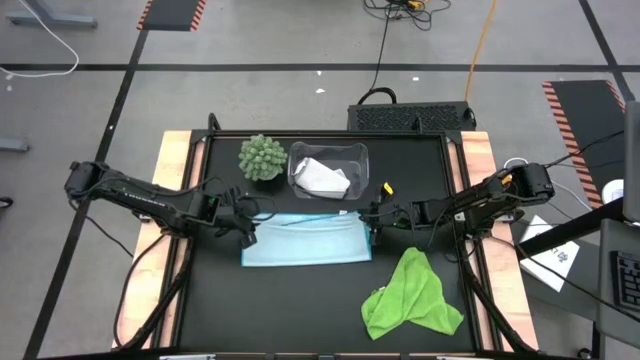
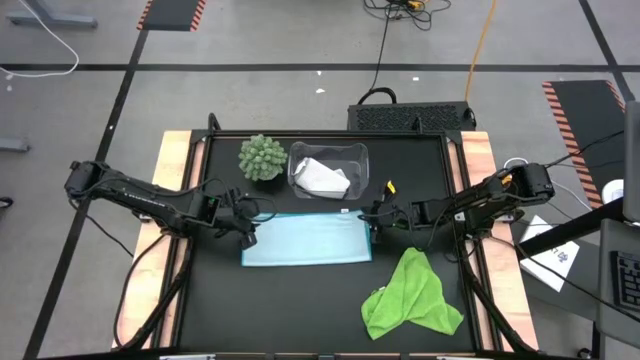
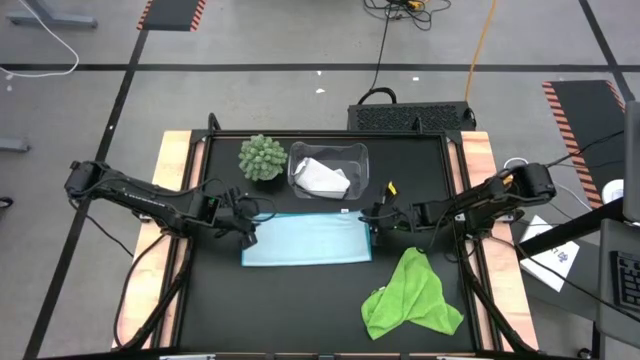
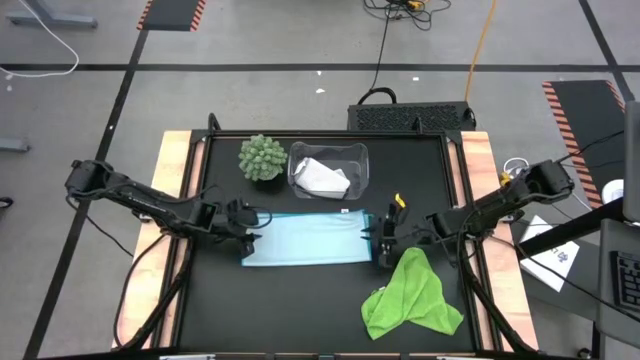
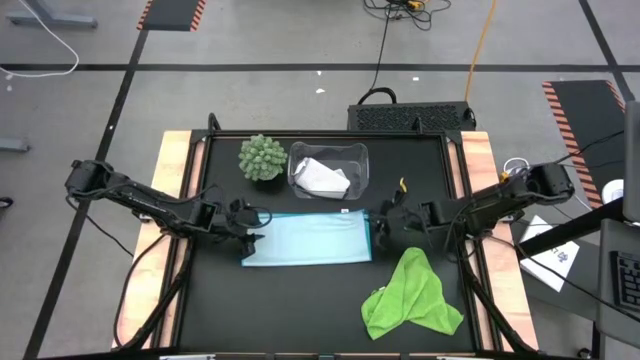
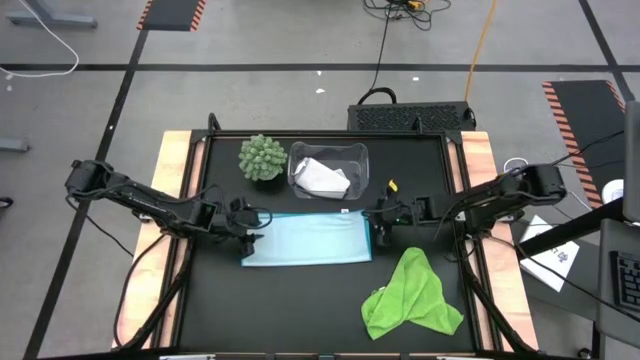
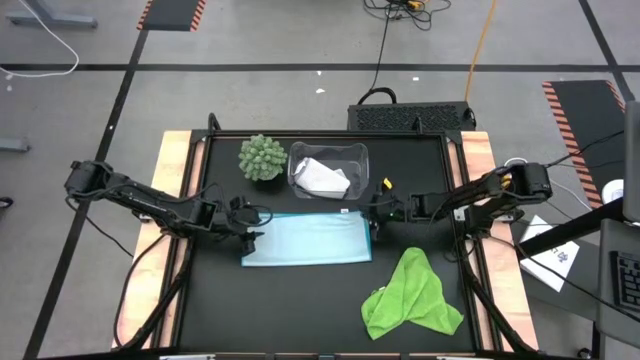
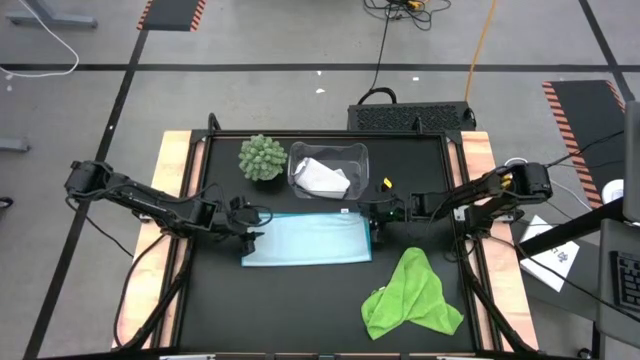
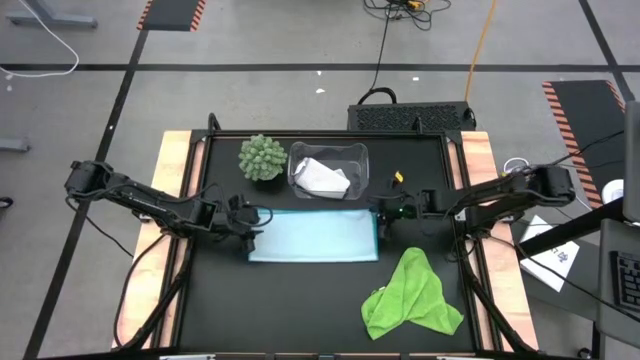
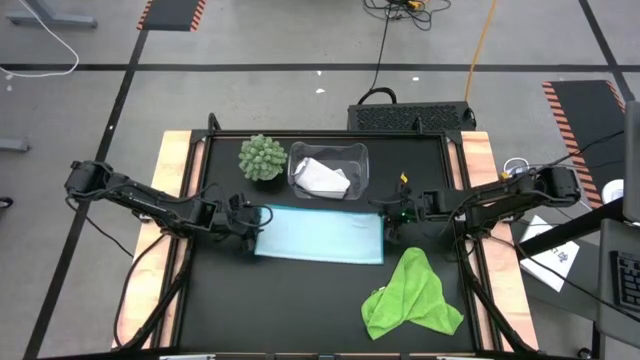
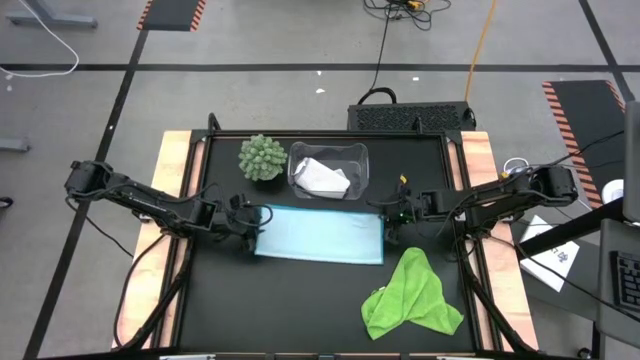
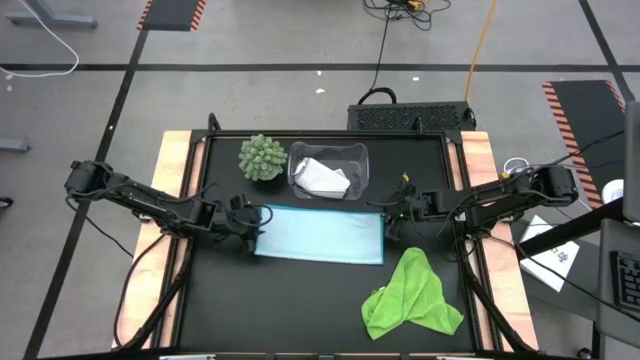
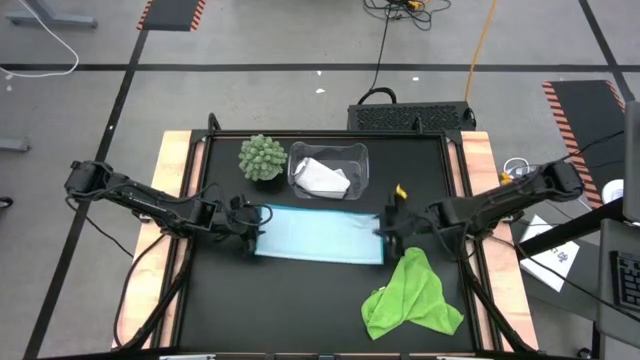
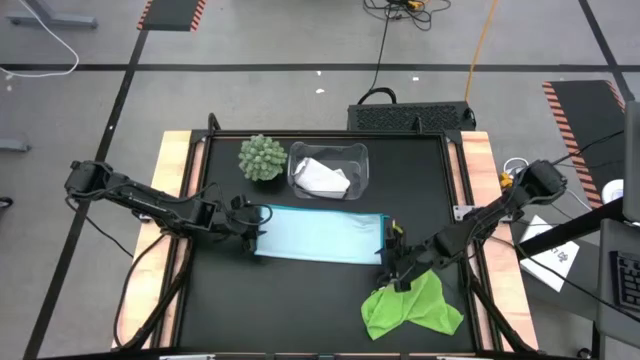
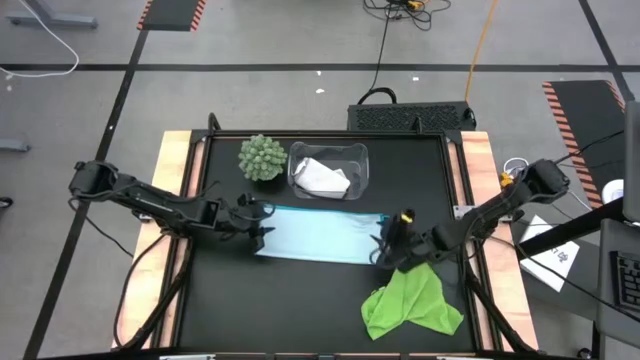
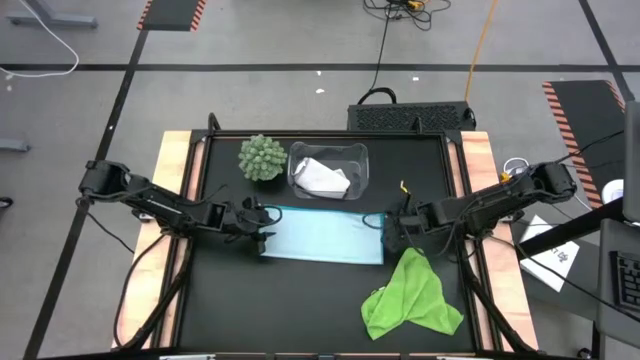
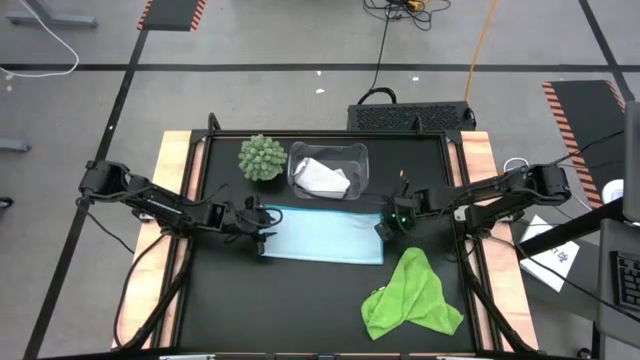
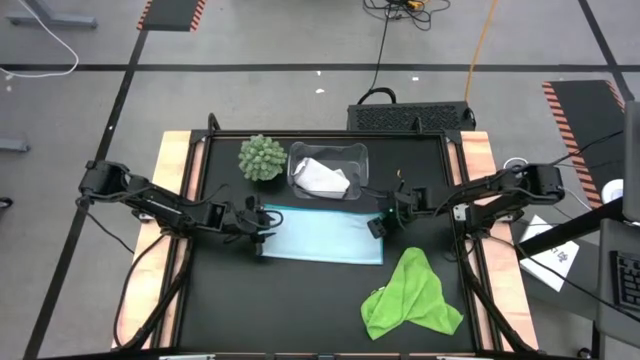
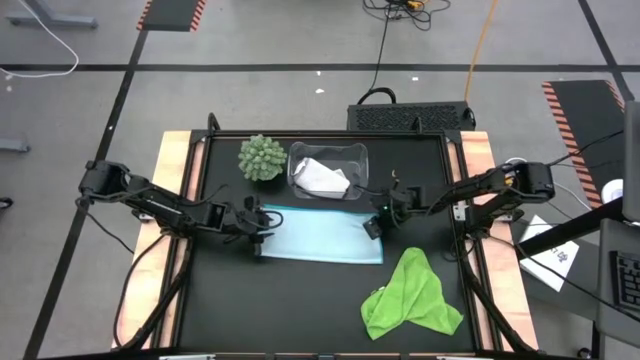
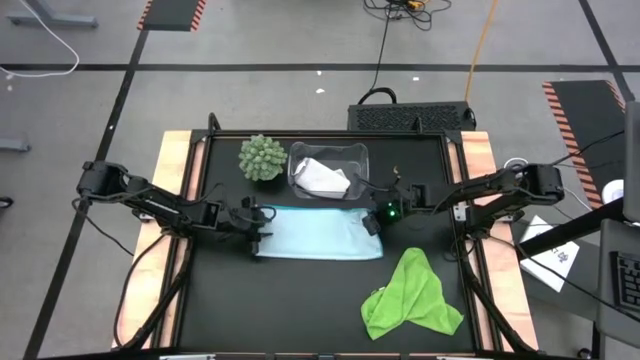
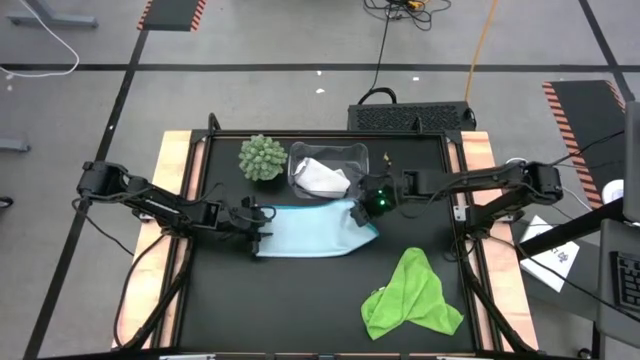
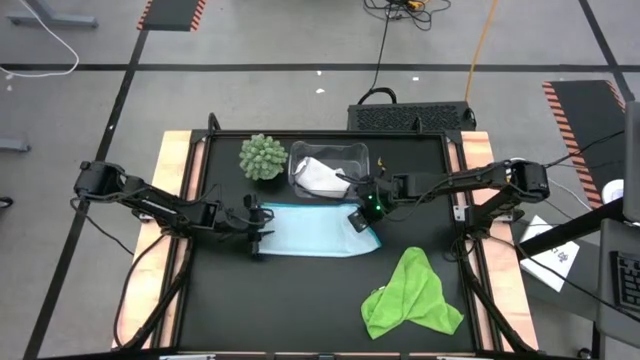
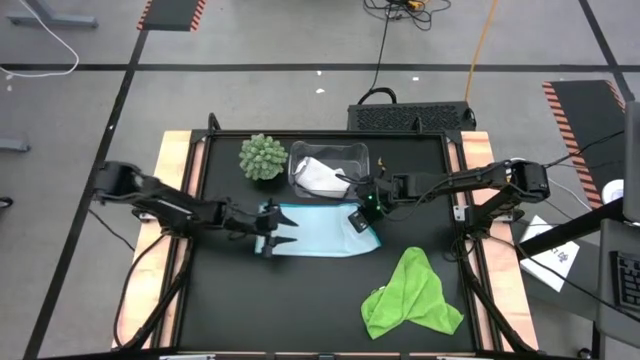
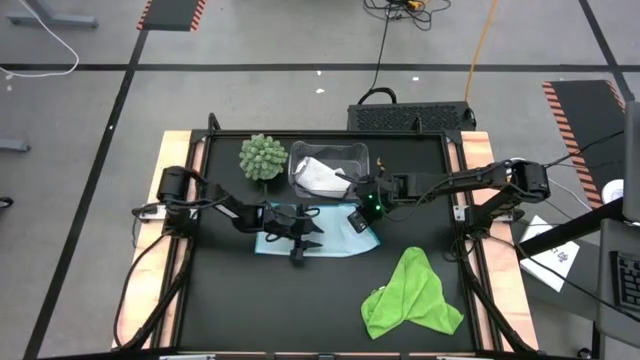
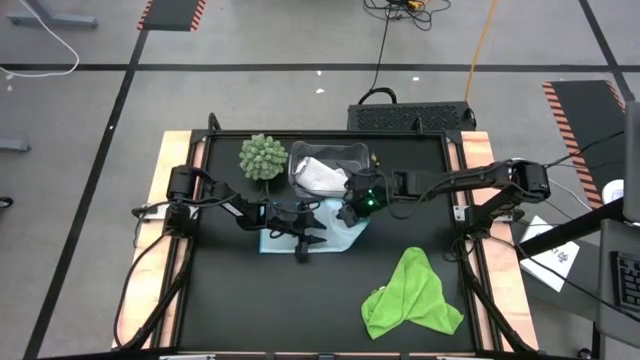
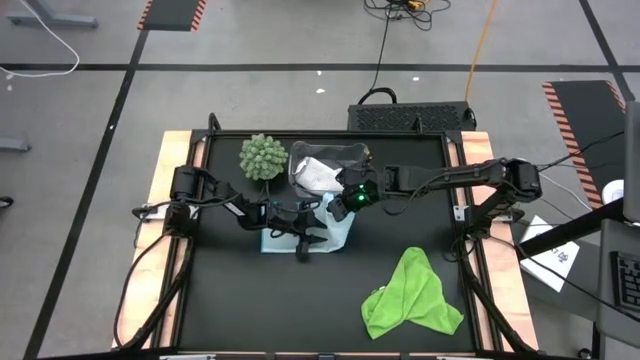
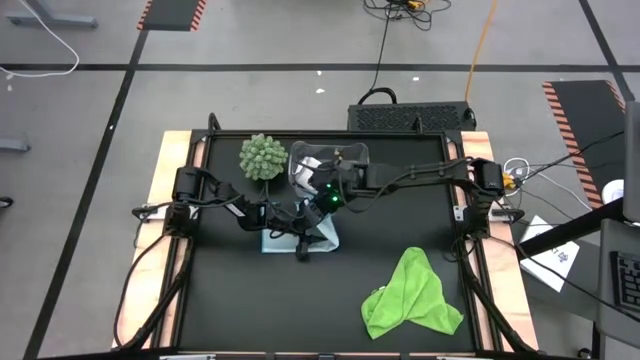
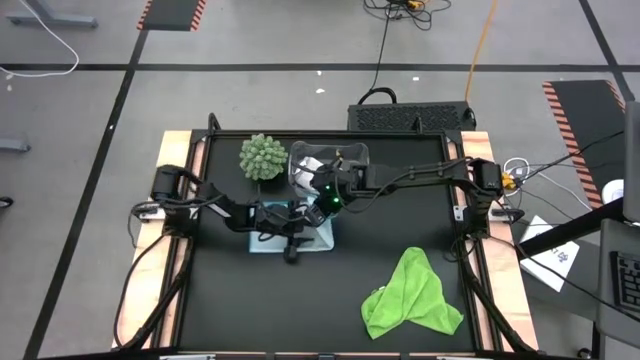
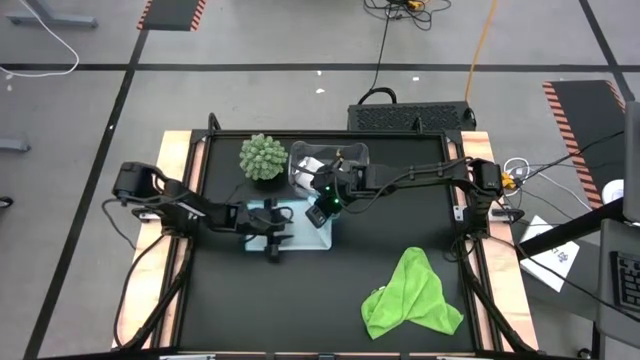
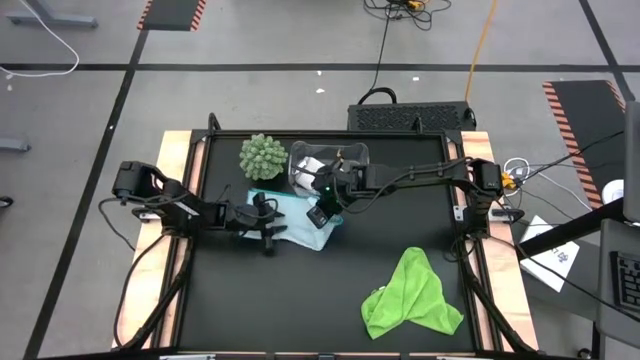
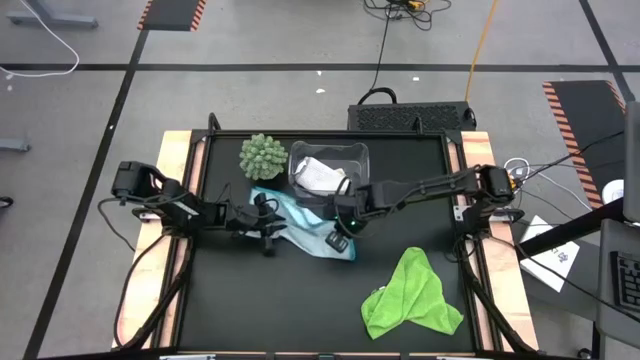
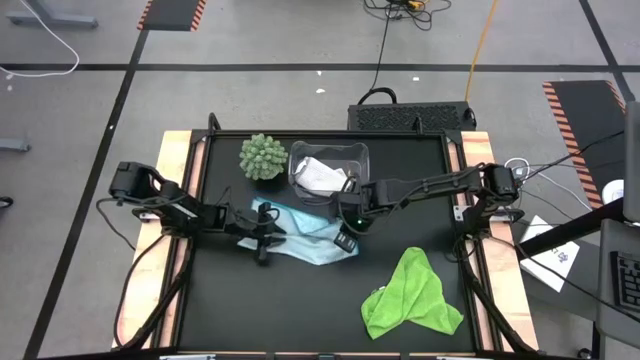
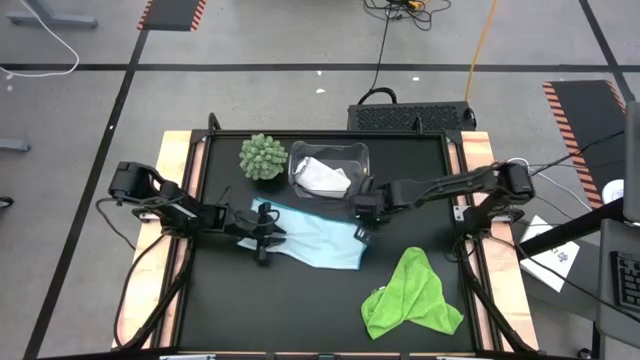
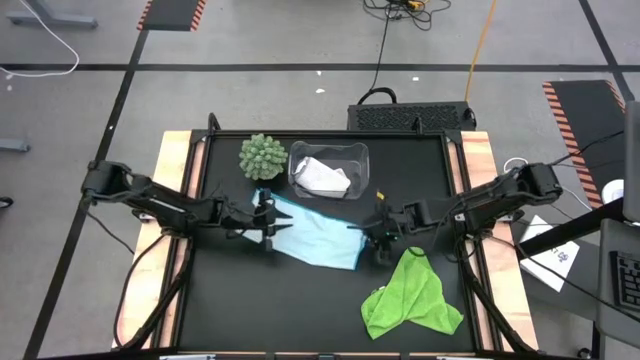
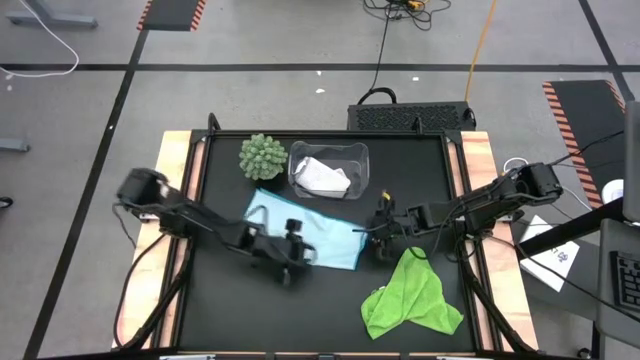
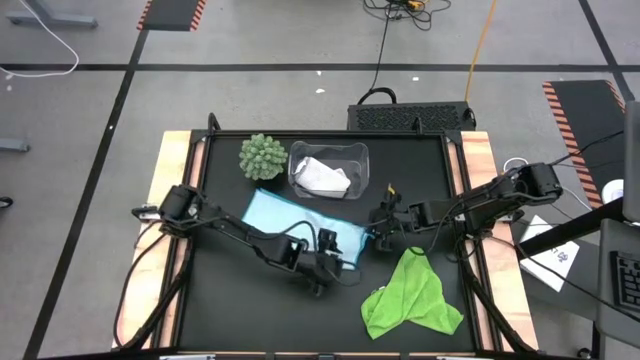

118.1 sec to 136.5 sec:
Task: Fold microfiber towels
Fold the blue towel

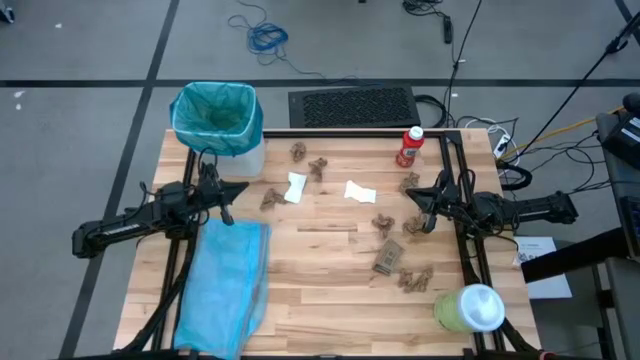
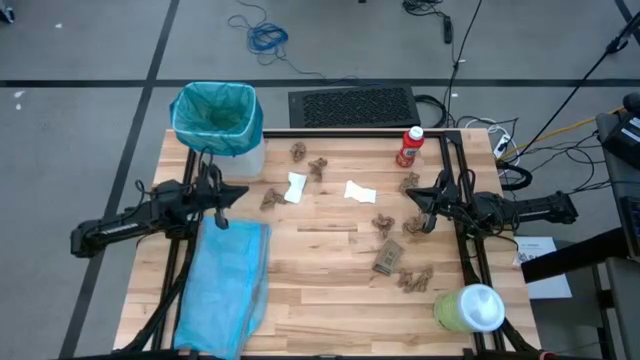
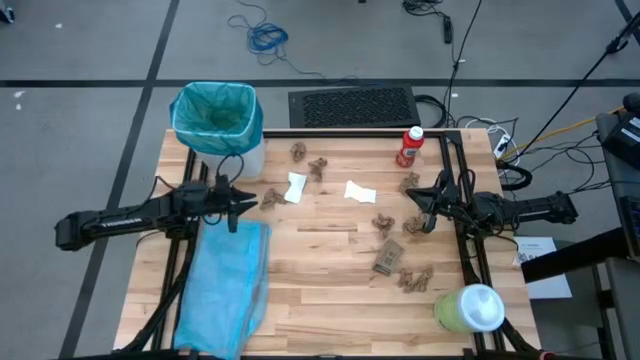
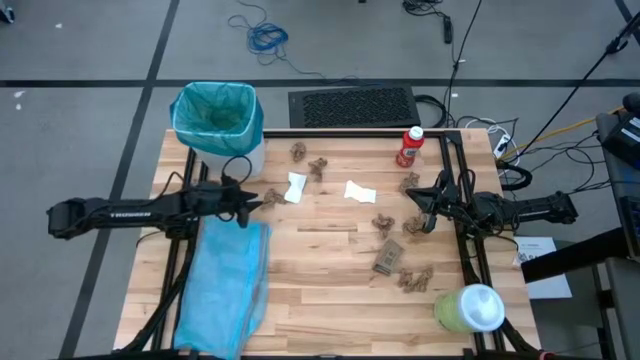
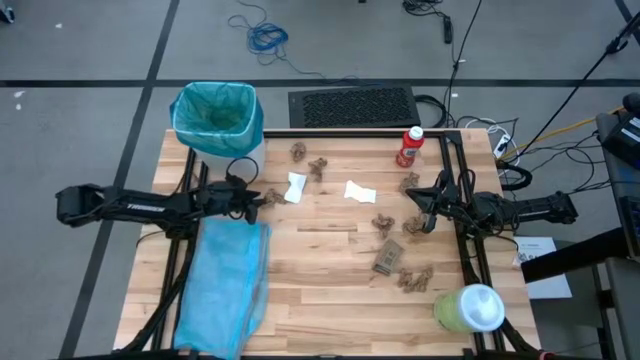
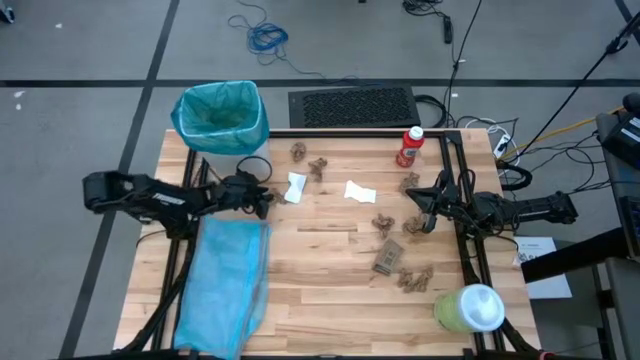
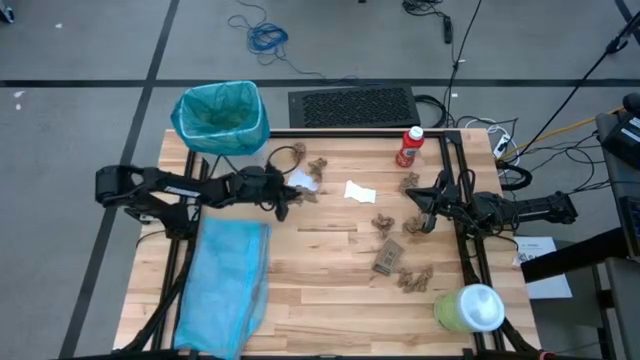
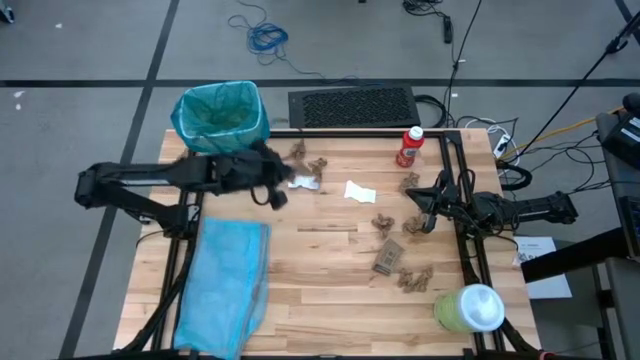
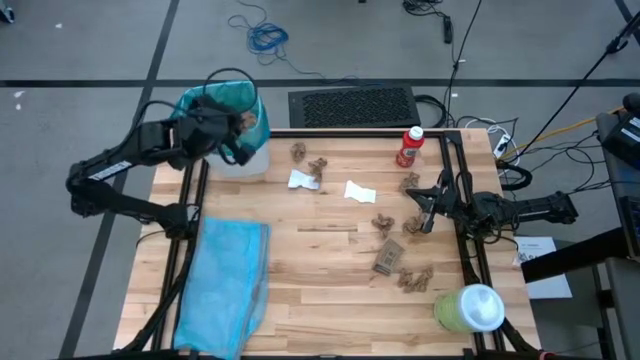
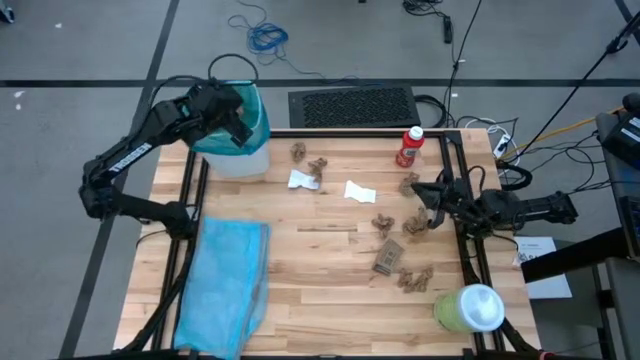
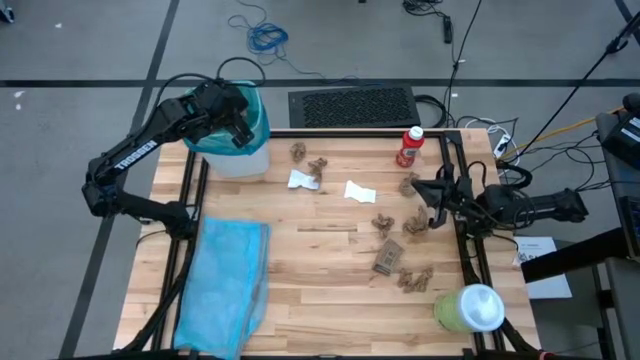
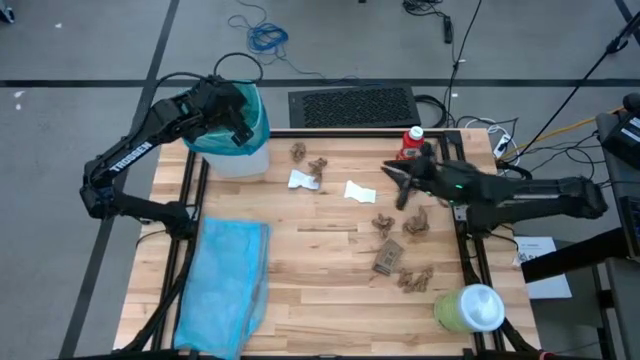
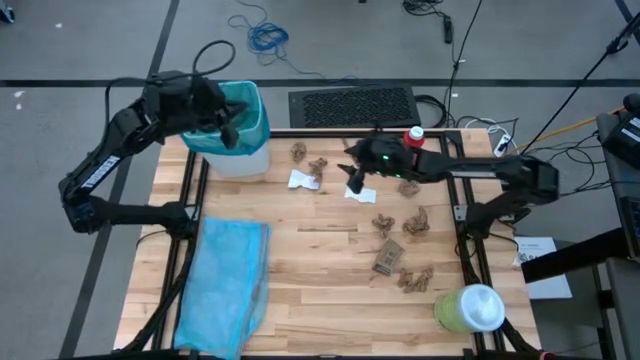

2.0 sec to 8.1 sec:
Task: place trash/remove bag and relplace
Put the brown napkin into the trash bin
